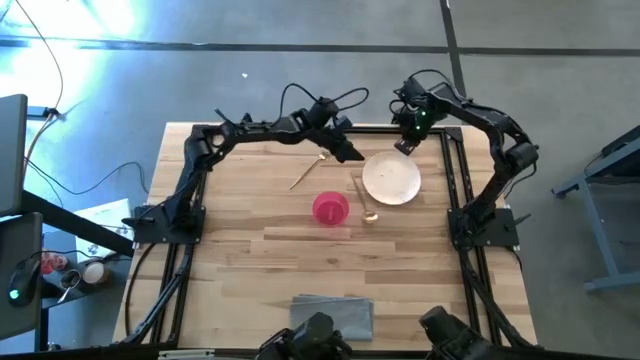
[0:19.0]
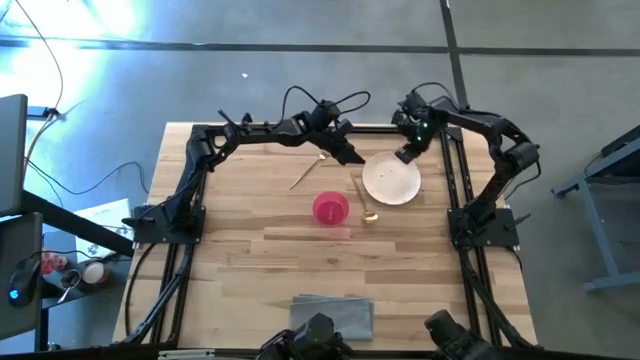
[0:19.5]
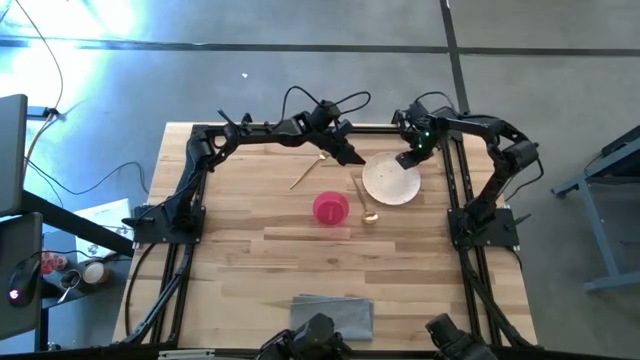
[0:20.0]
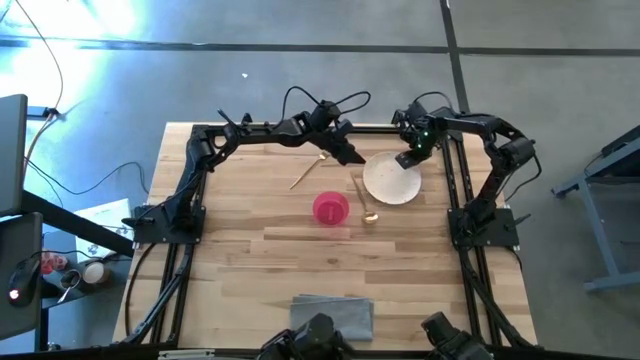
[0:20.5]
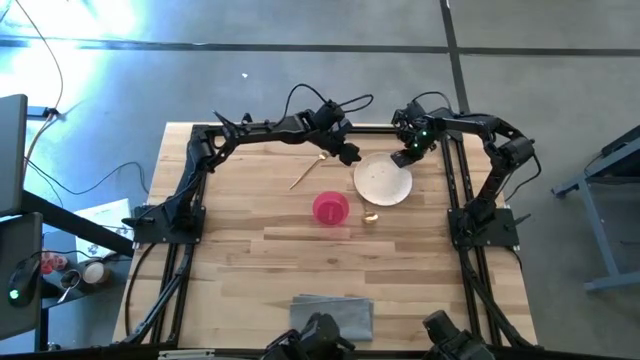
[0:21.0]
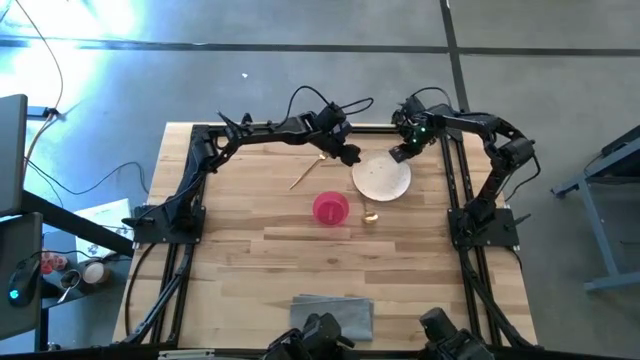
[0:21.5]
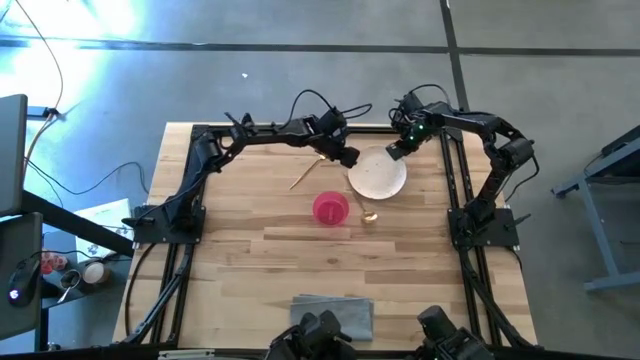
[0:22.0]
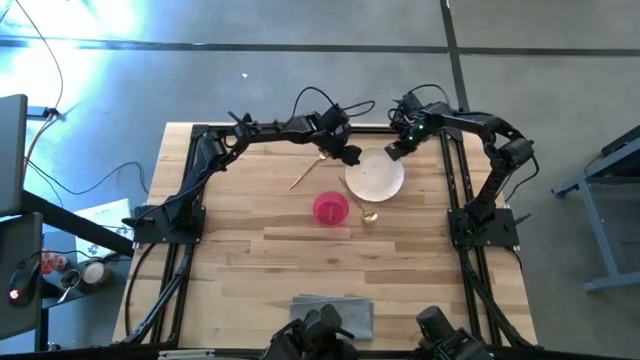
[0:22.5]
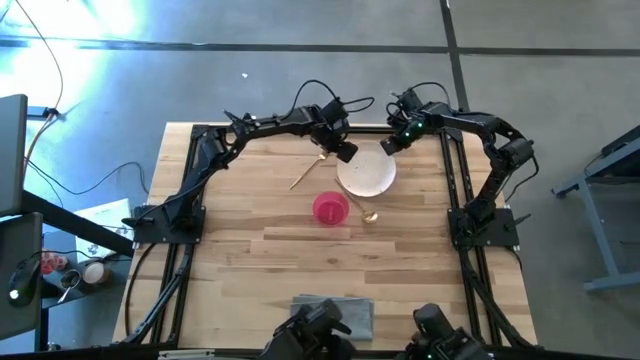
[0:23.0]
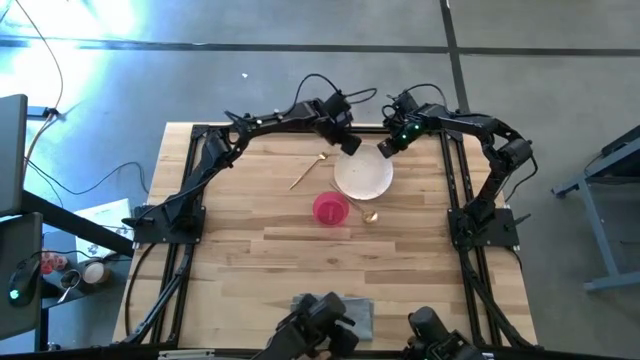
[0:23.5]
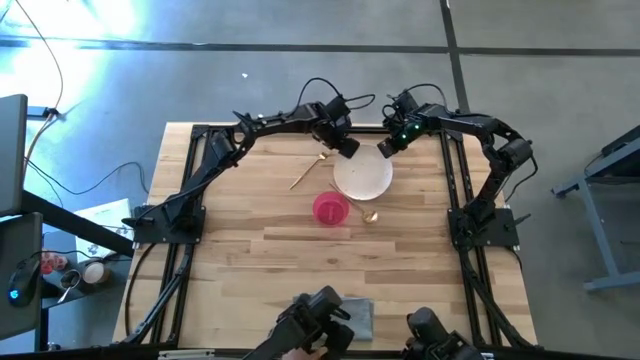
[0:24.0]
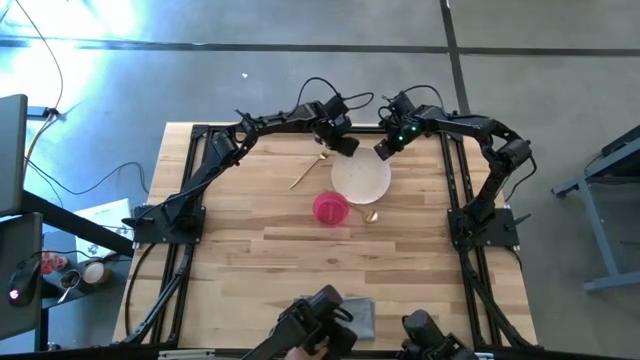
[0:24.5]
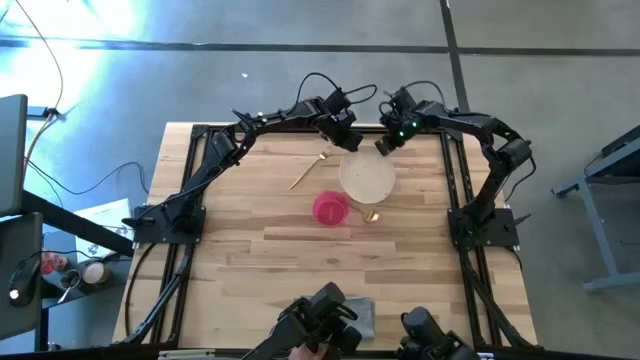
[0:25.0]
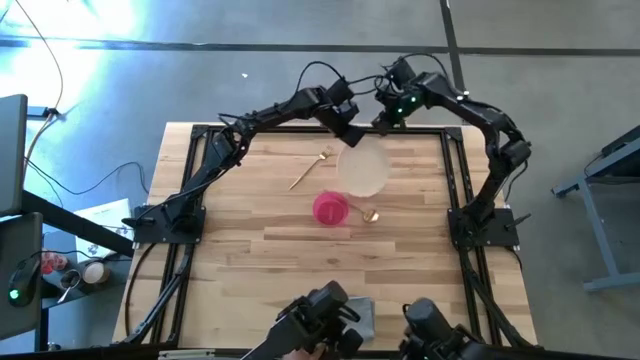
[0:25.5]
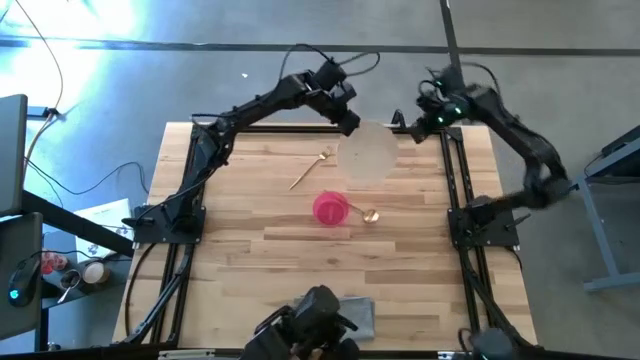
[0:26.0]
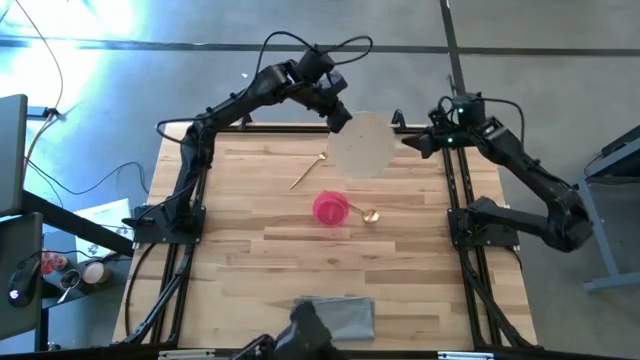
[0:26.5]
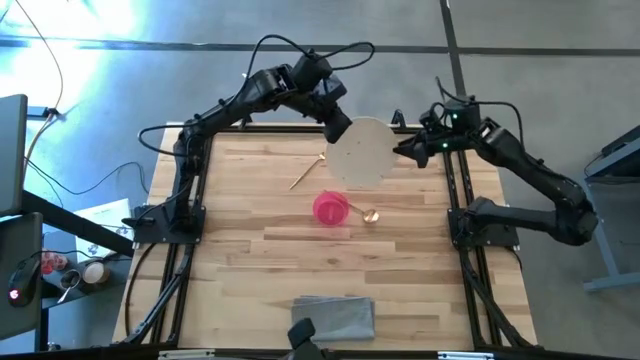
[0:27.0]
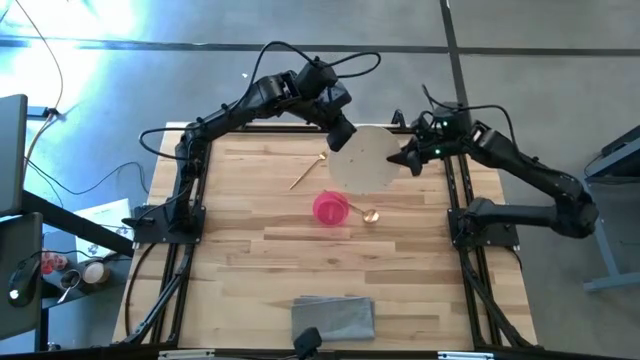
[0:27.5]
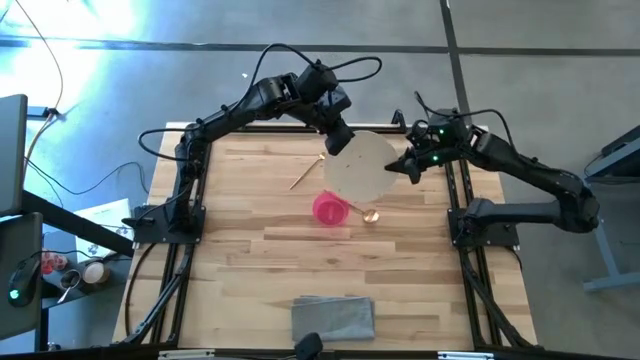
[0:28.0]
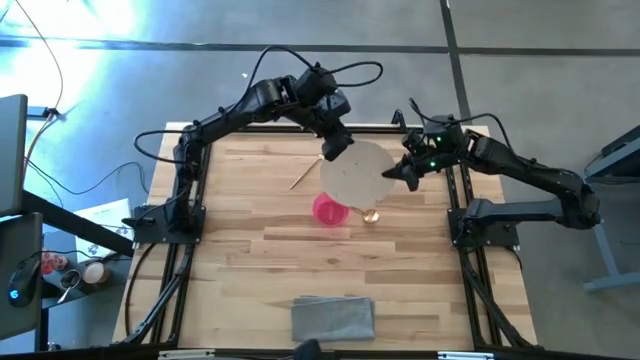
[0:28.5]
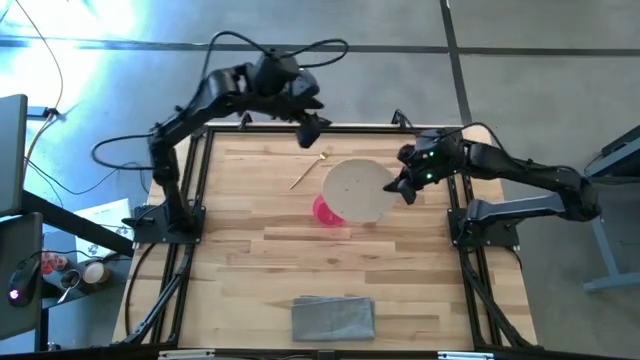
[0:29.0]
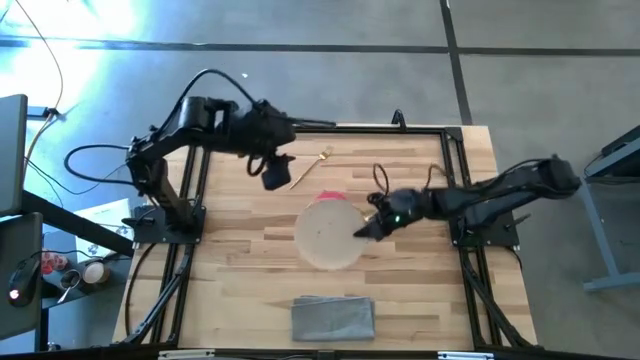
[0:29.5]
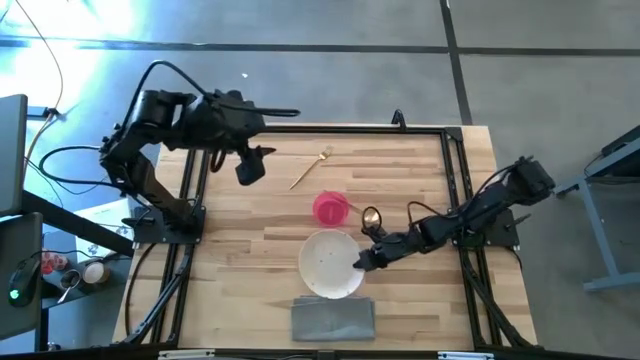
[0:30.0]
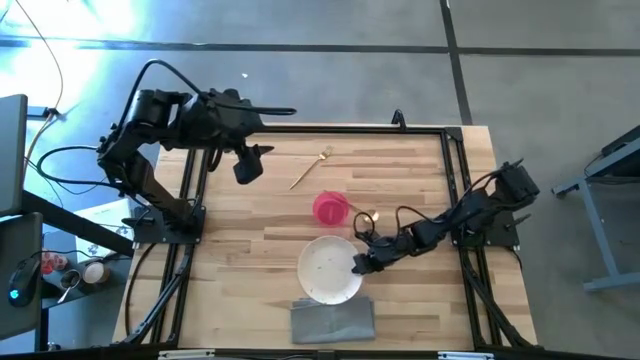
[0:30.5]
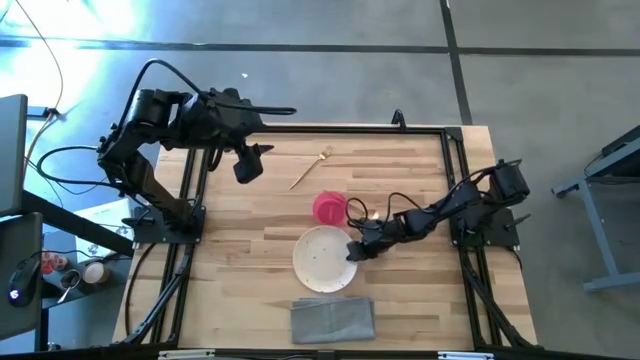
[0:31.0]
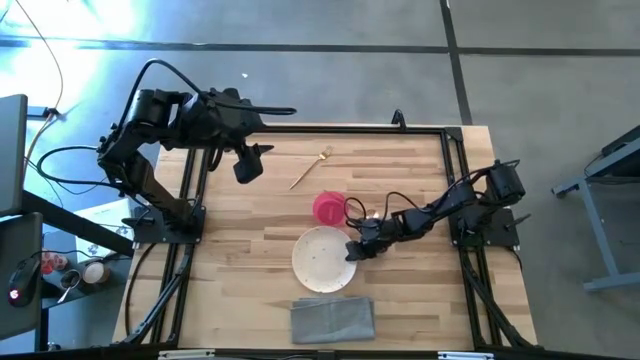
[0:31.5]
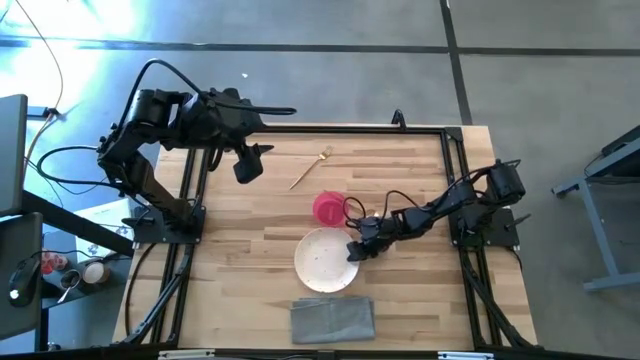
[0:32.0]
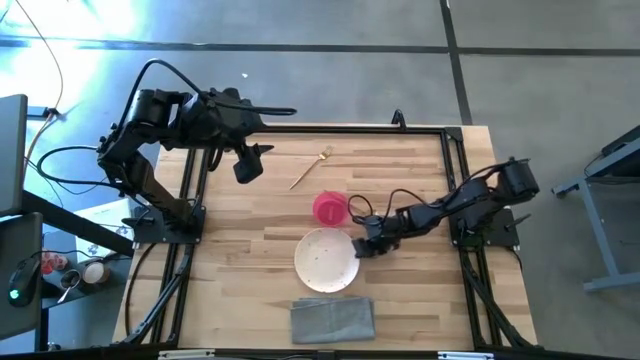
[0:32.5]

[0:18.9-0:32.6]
Task: Set table place
Move the white plate to the middle

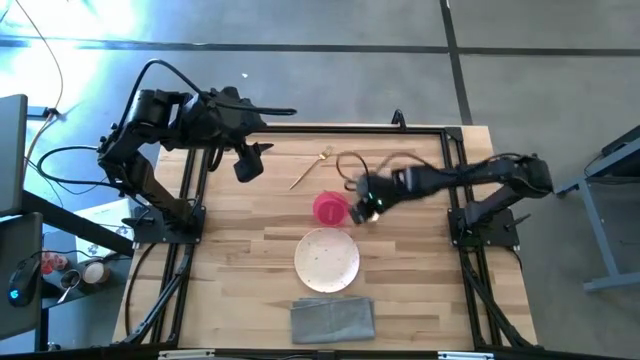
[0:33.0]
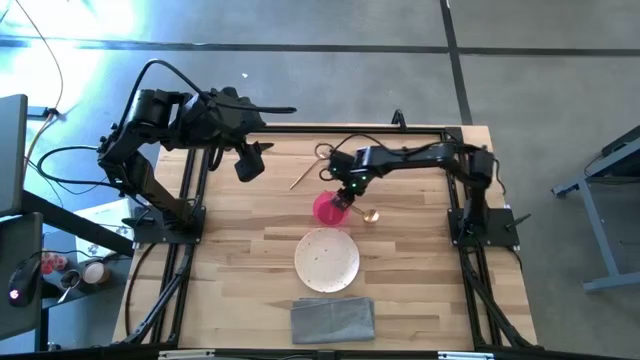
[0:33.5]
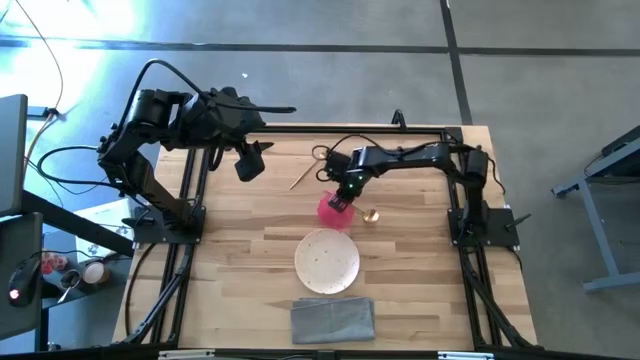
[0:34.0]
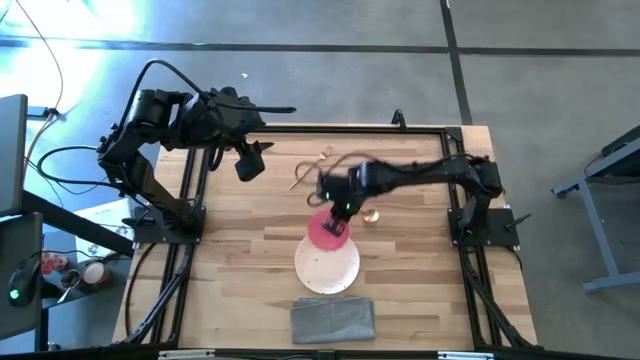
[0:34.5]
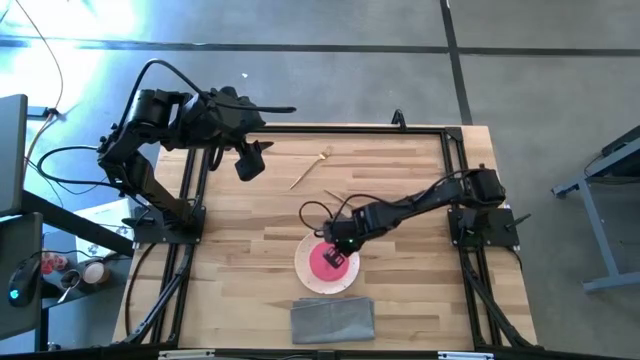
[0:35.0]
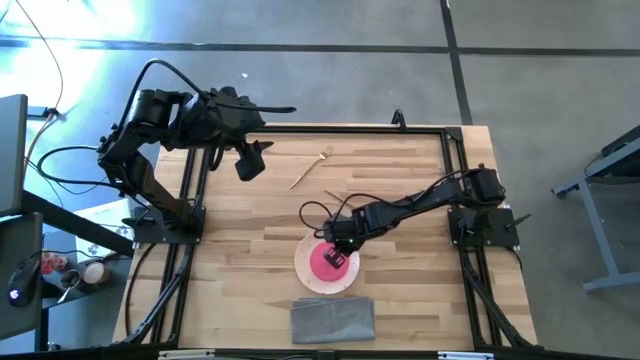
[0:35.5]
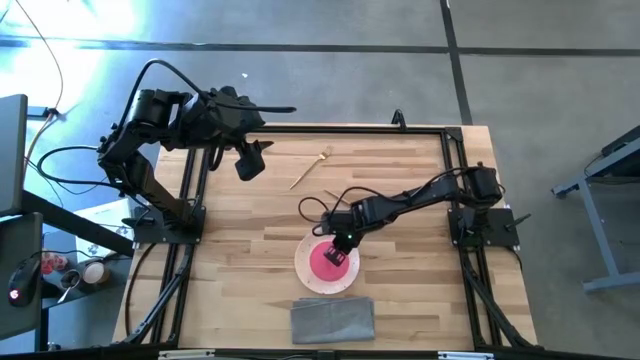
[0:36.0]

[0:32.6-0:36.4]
Put the pink bowl on top of the white plate

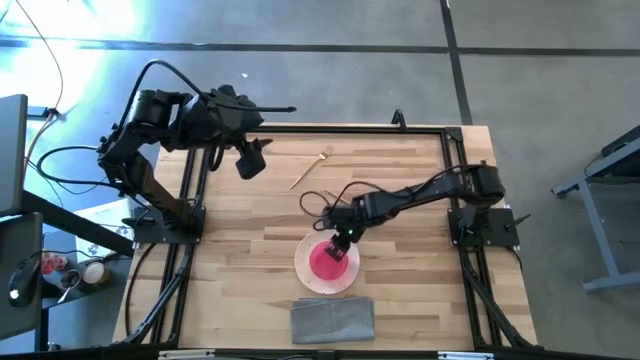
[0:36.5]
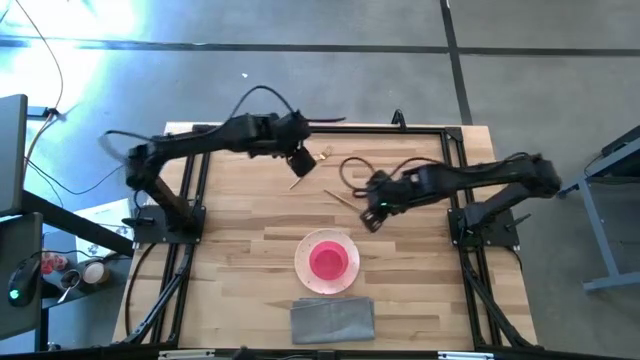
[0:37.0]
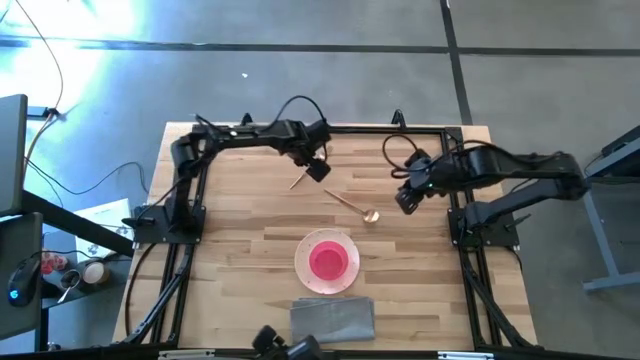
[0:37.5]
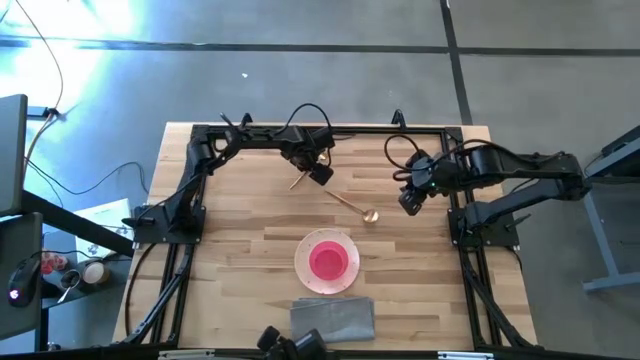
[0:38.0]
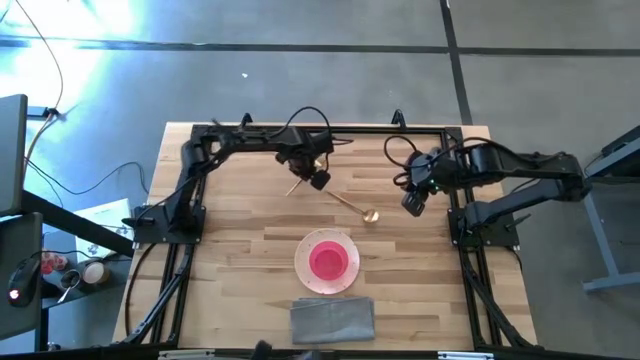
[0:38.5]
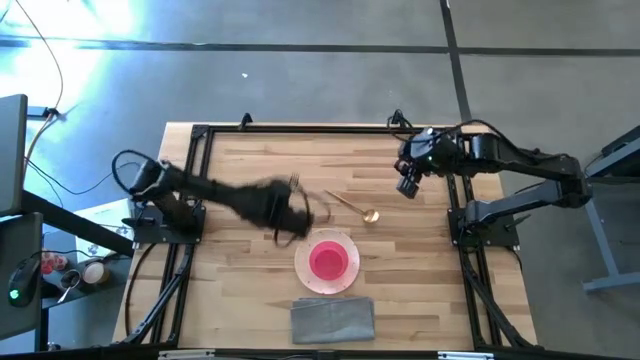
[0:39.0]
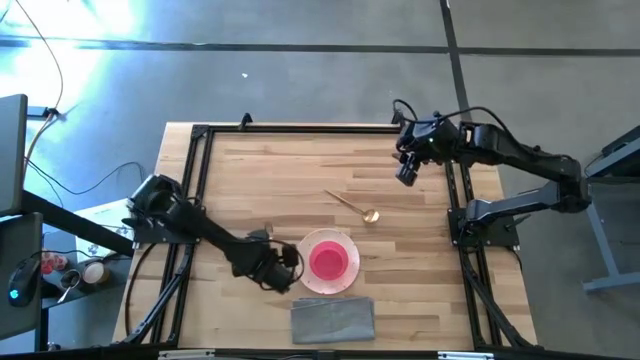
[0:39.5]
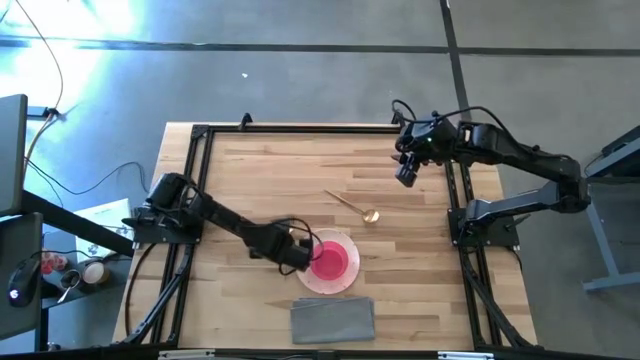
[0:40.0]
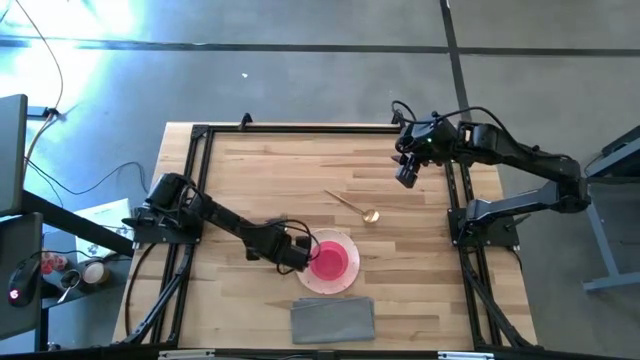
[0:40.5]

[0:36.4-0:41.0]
Put the gold fork to the left of the white plate
